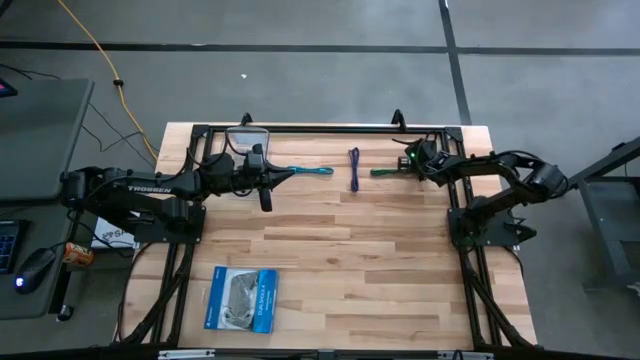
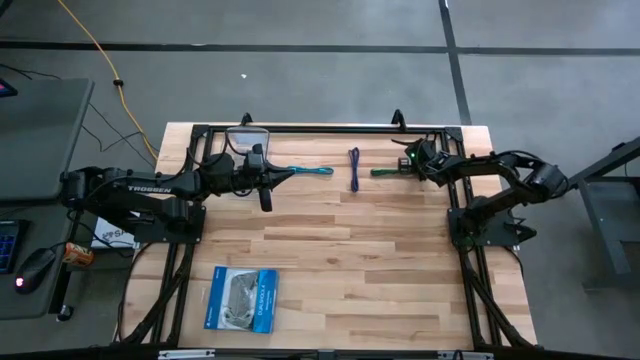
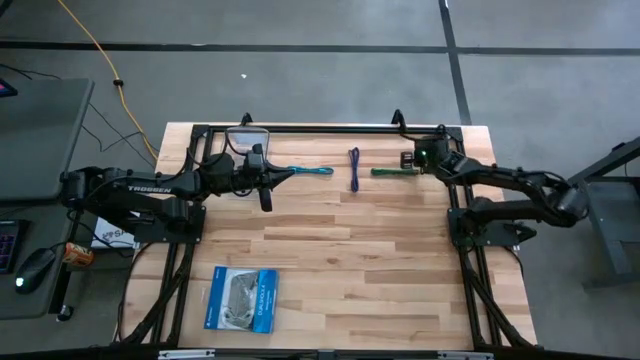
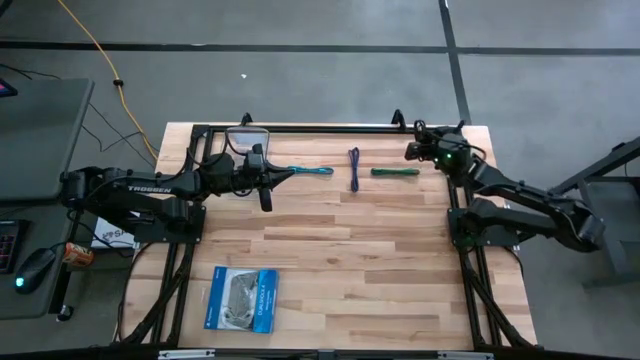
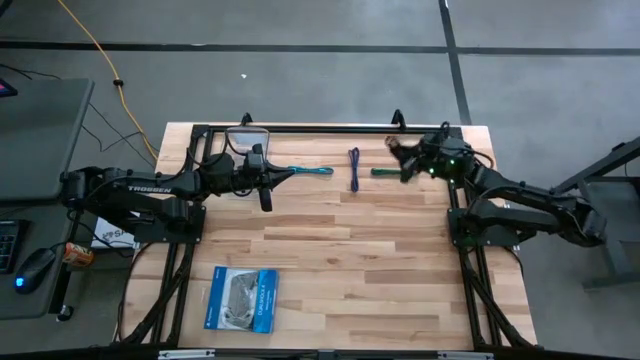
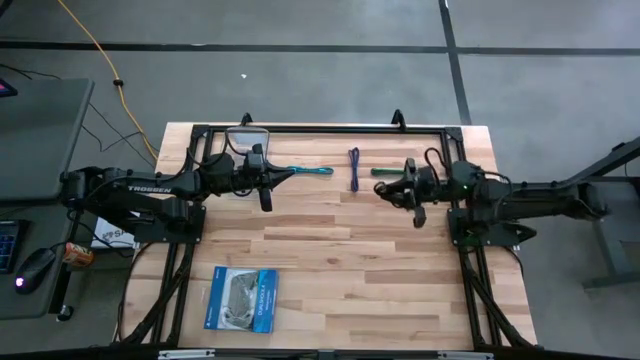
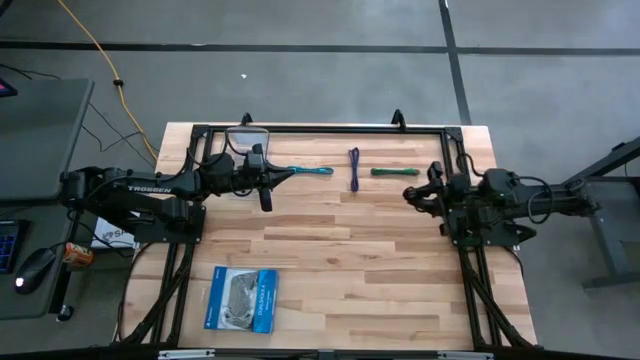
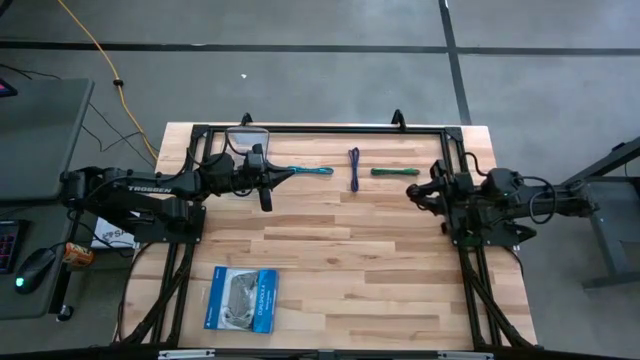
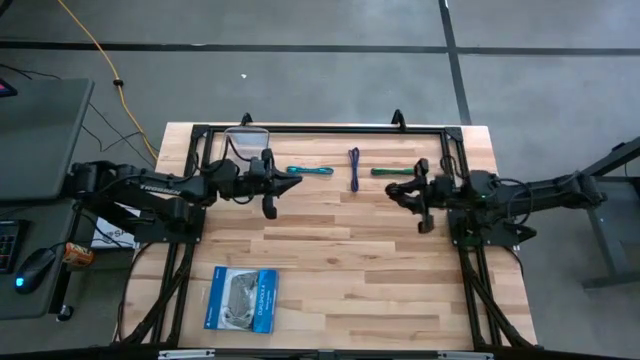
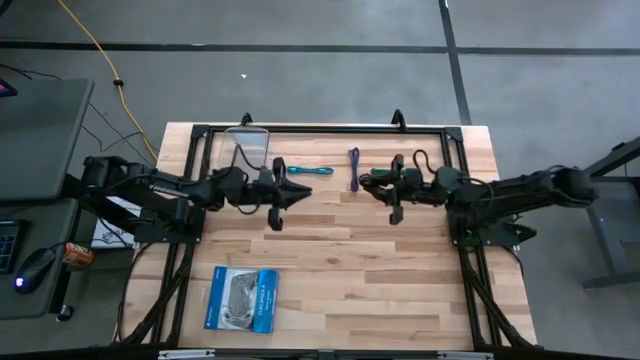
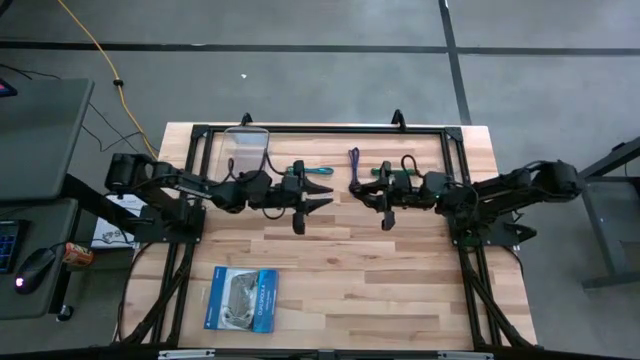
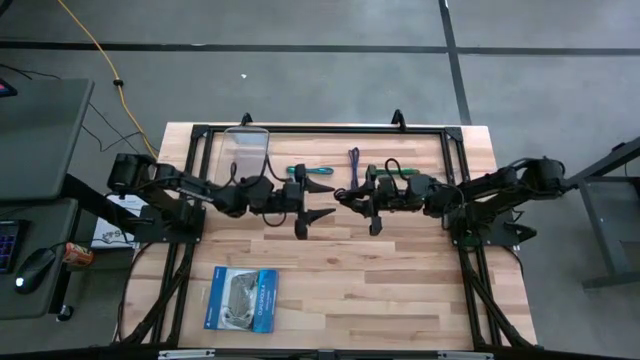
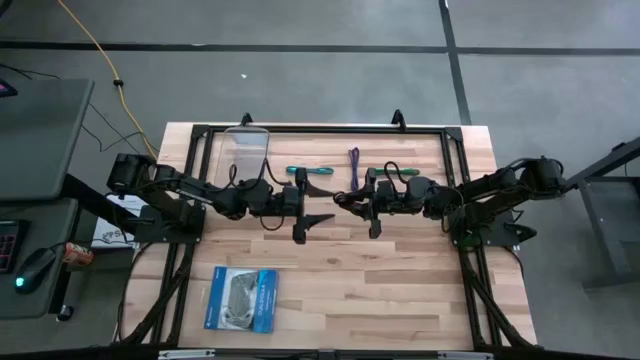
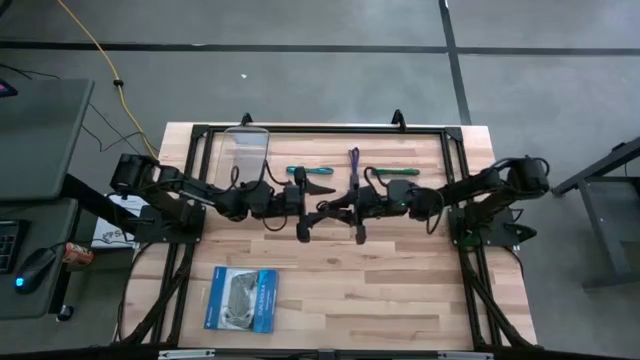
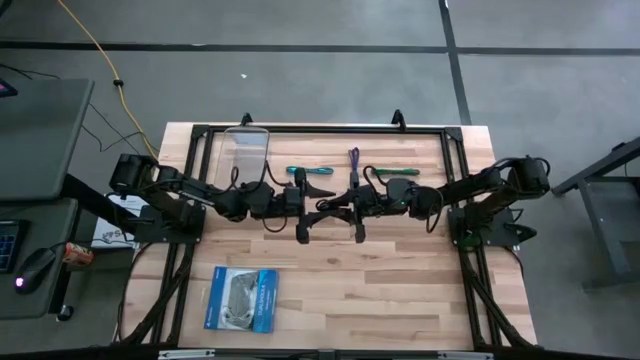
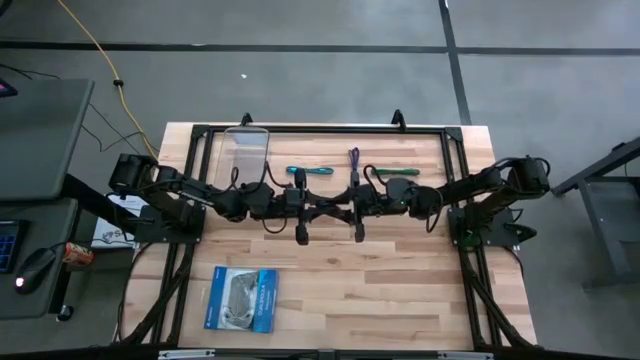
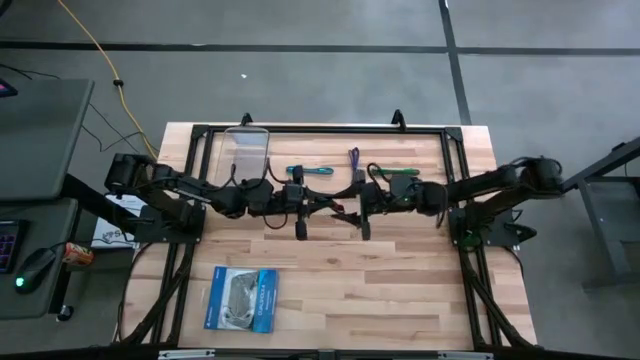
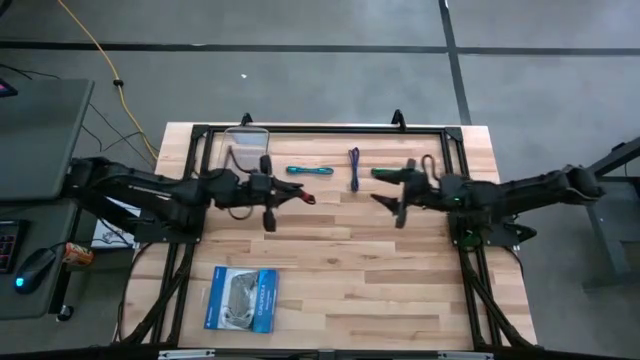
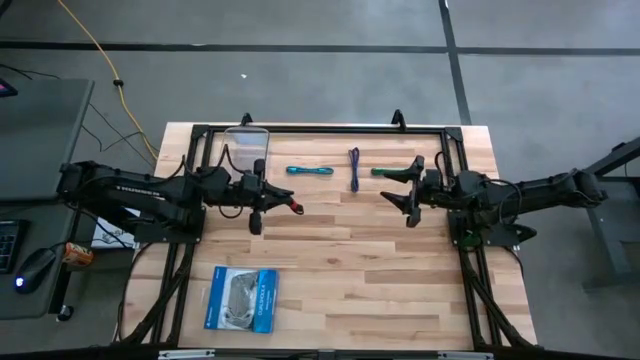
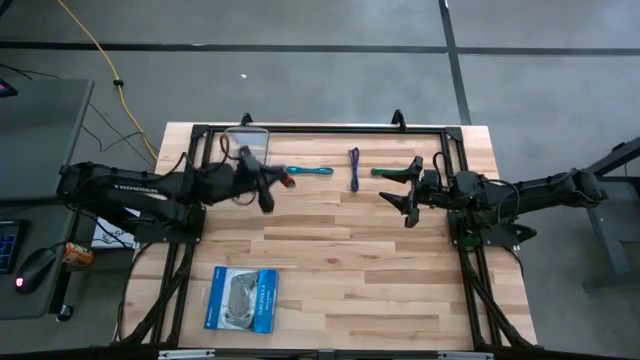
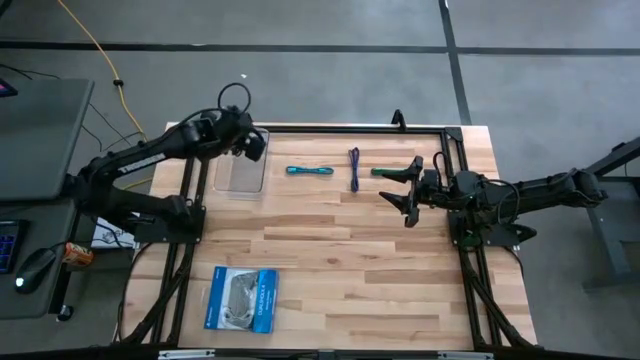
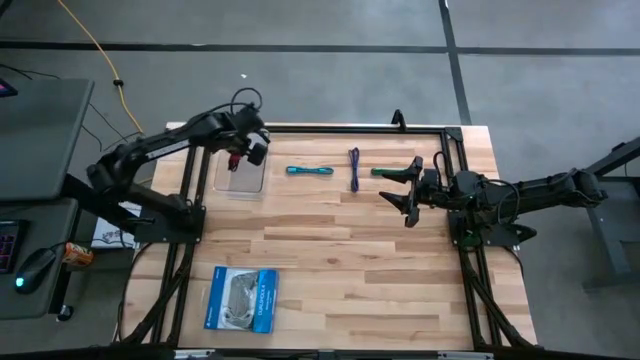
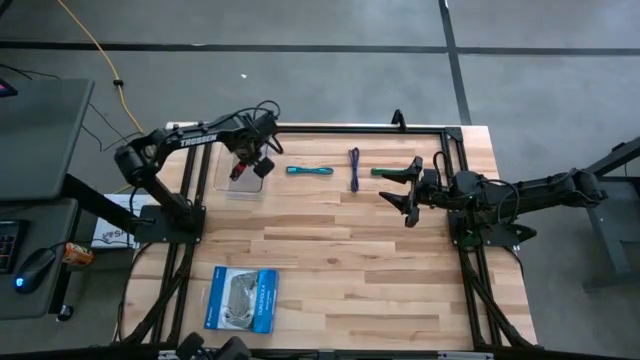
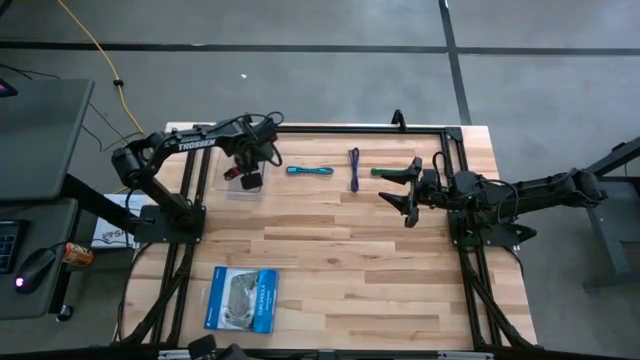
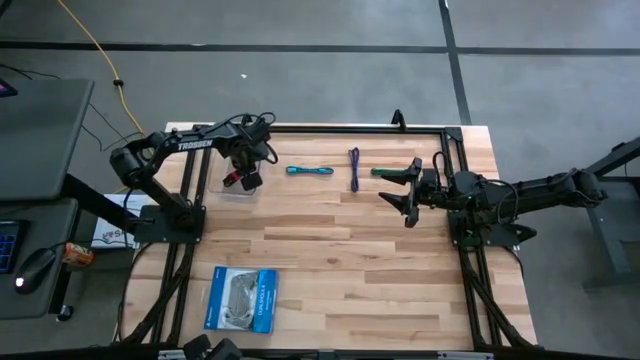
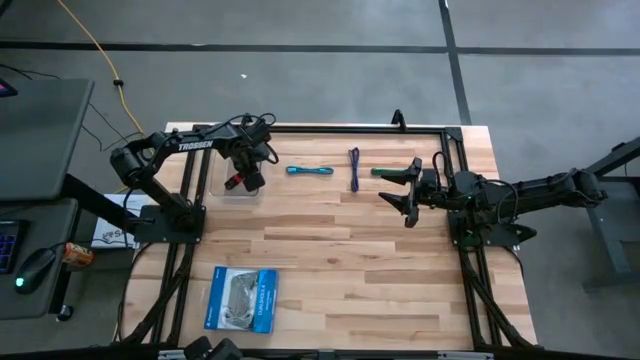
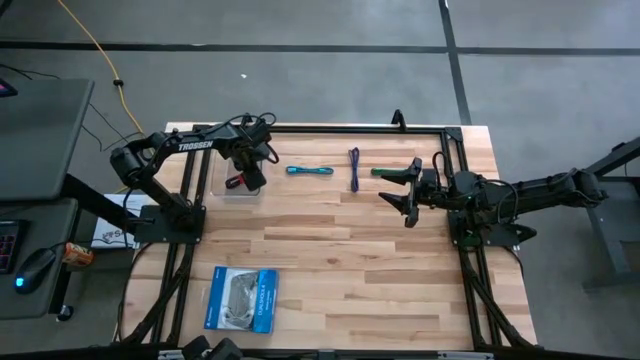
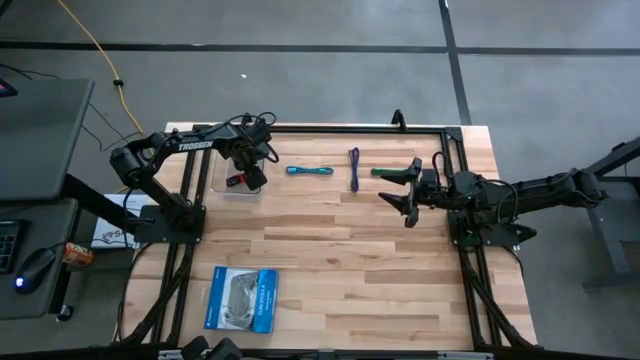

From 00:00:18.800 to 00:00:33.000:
Task: Pick and place USB-C Cables
Put the black USB cable into the transparent bin

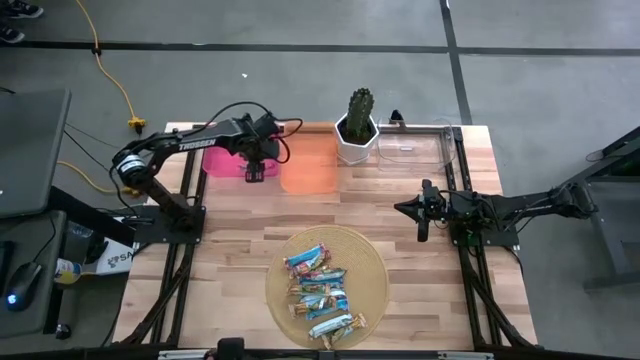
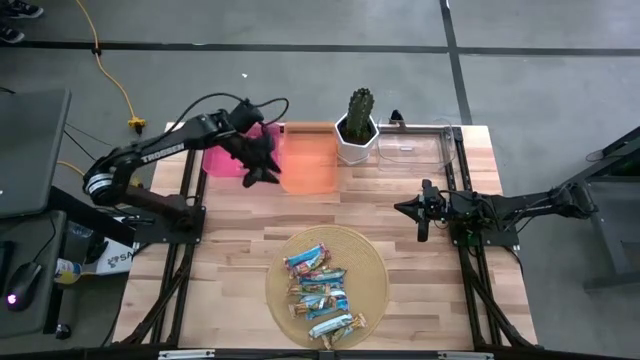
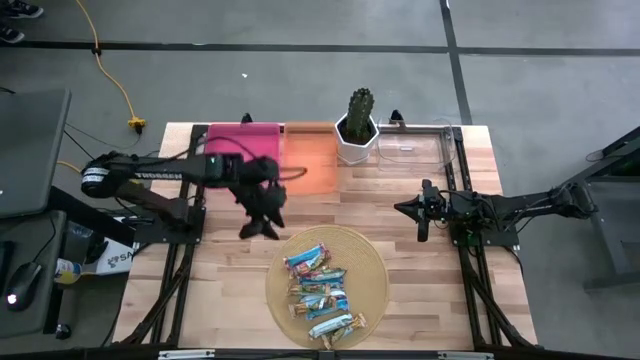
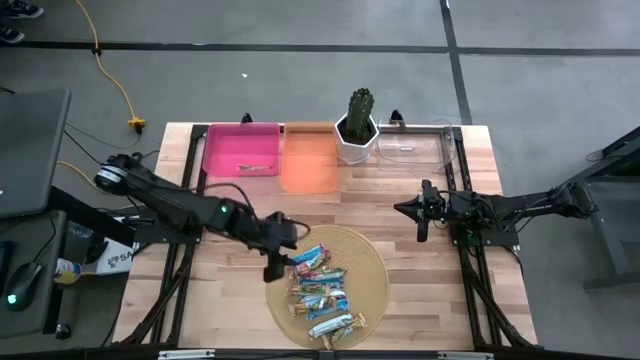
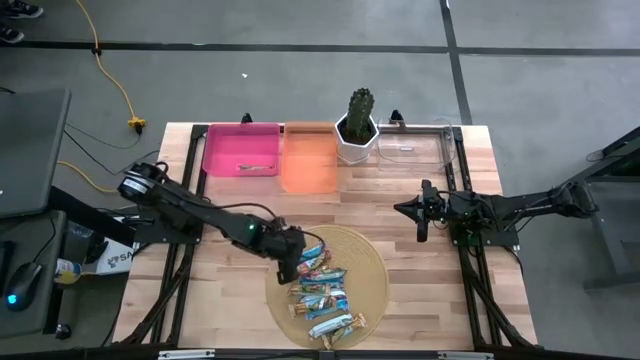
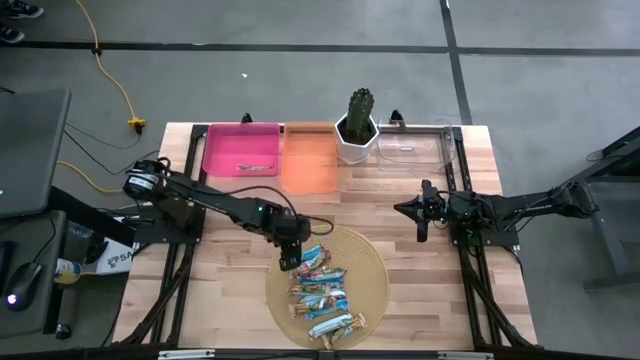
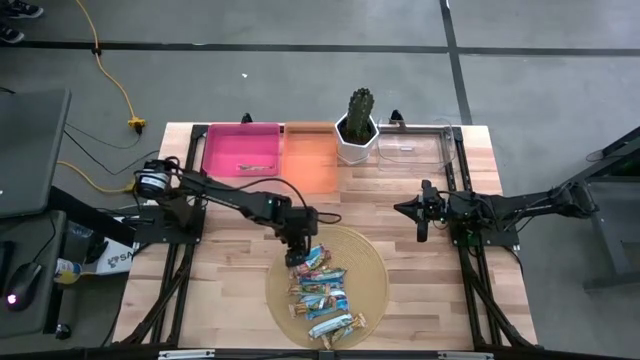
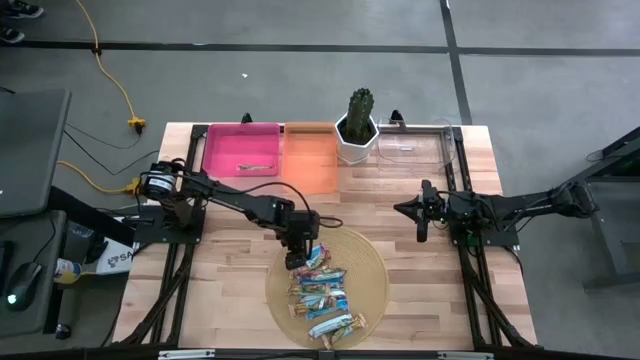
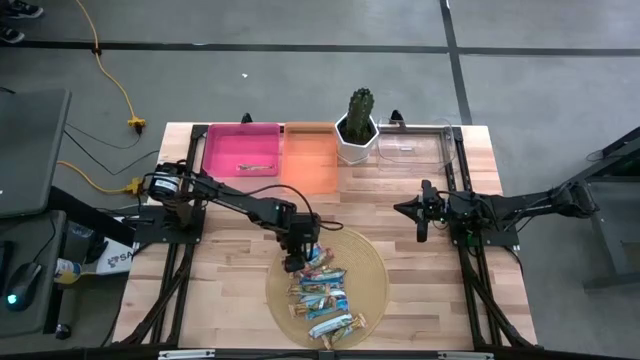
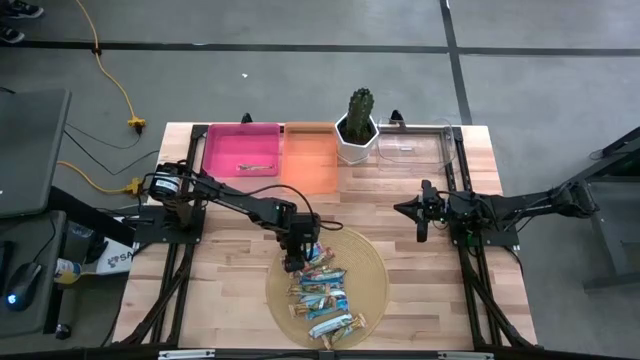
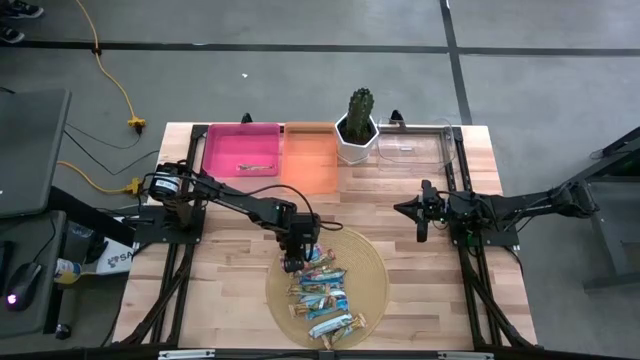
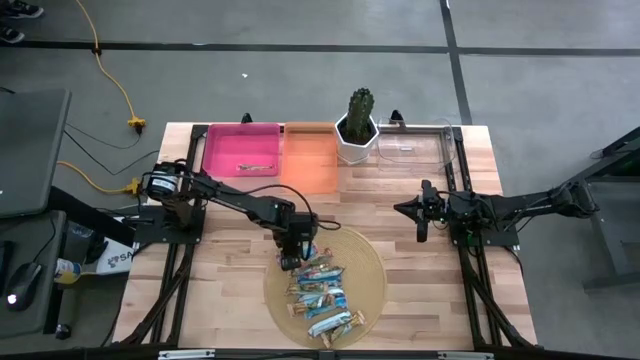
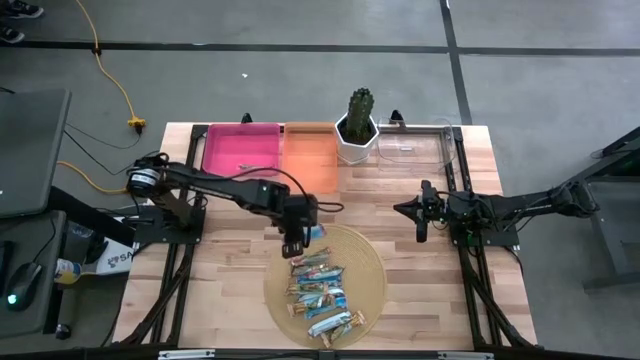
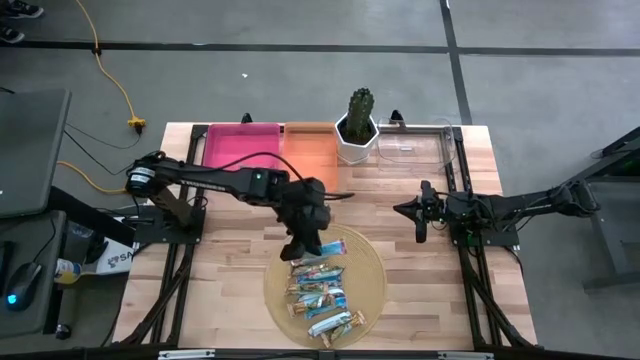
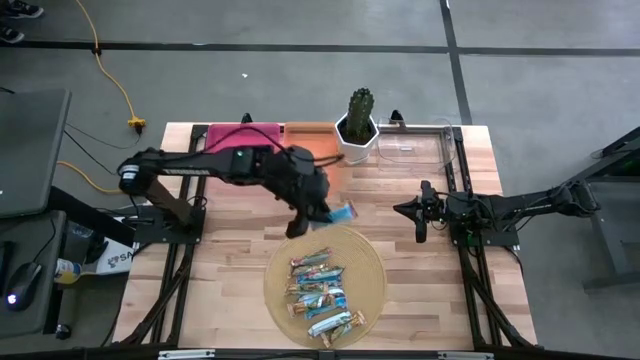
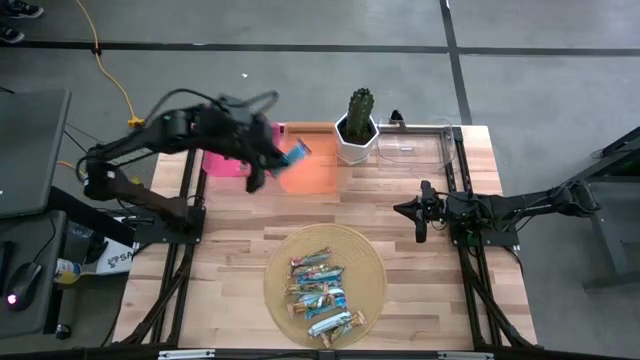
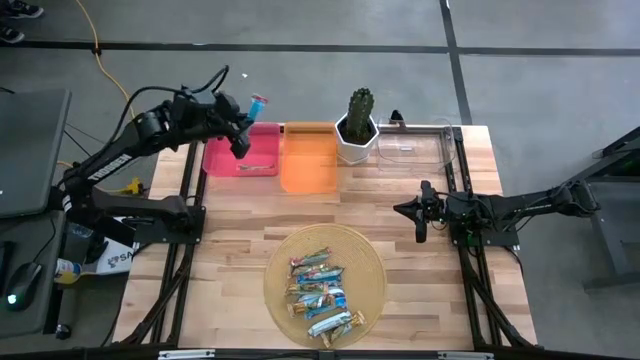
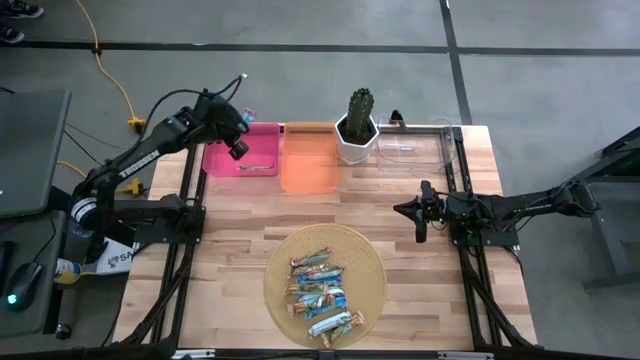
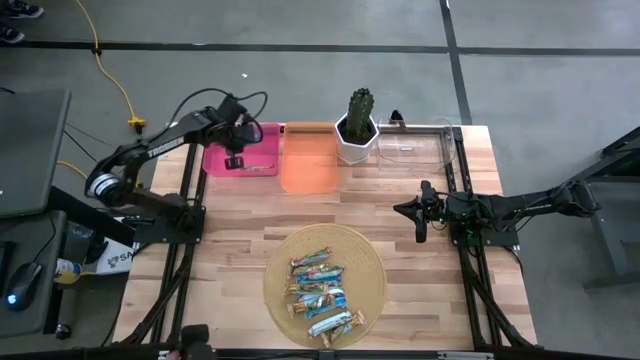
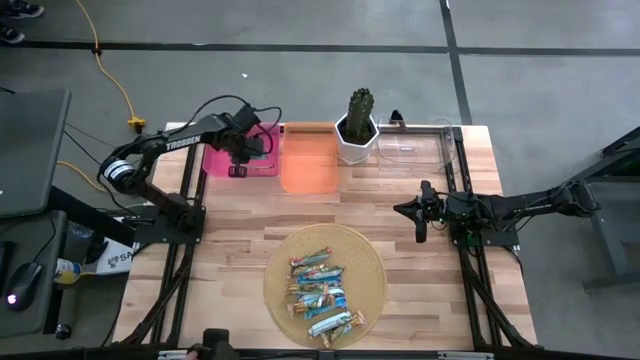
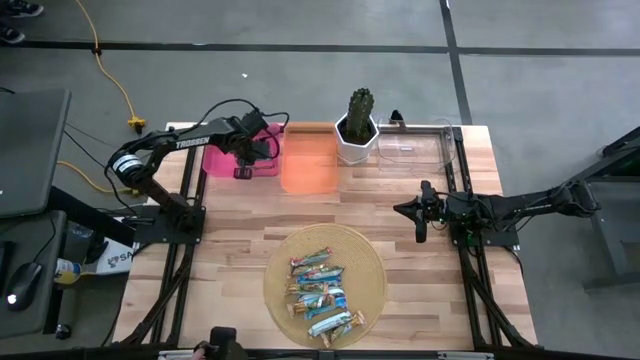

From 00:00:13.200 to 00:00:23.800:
Task: Pick and place Granola Bars by type
Put the red granola bar into the pink bin
